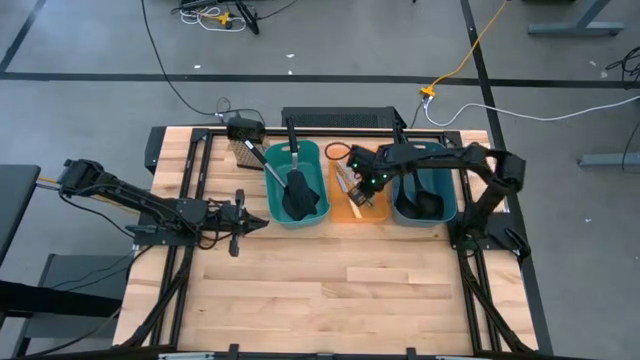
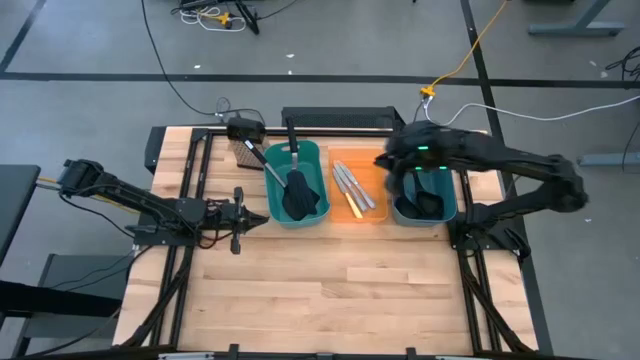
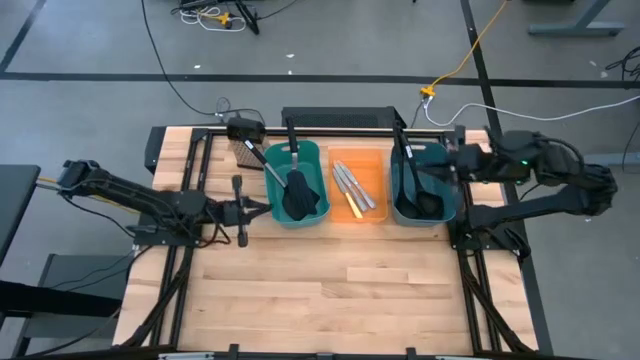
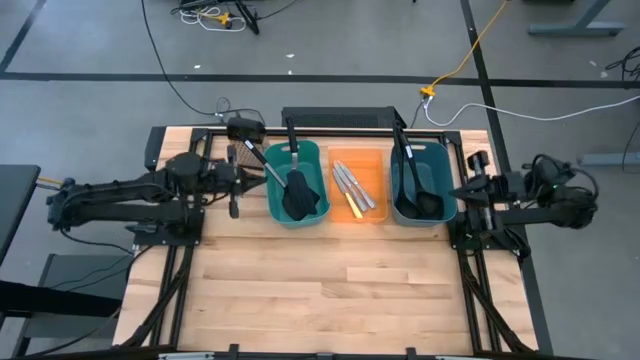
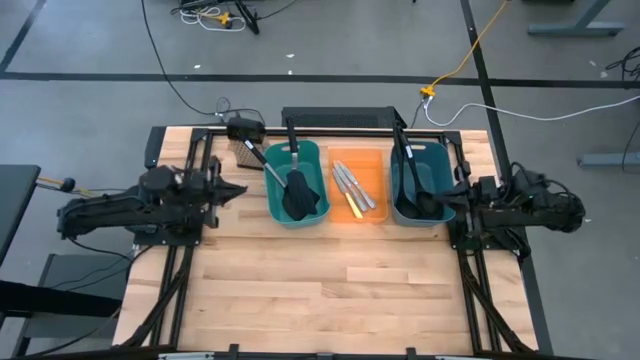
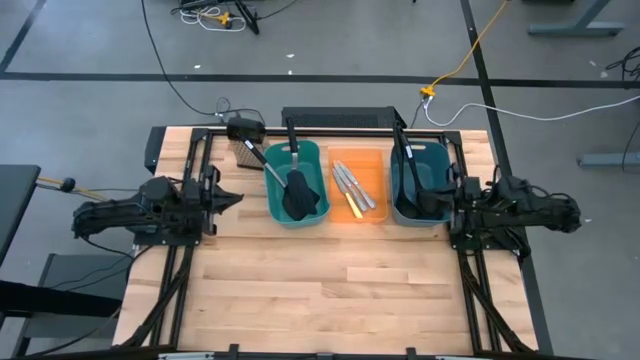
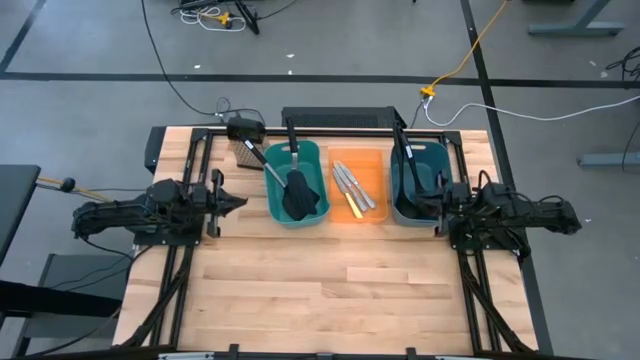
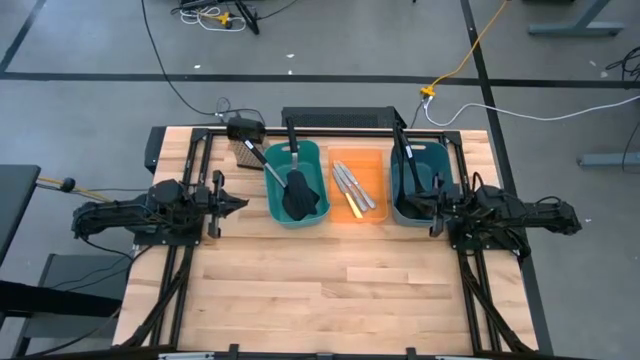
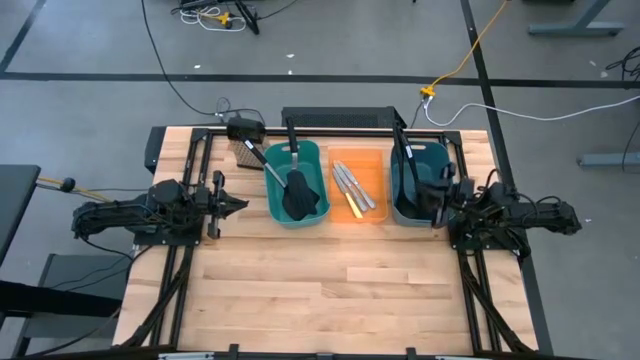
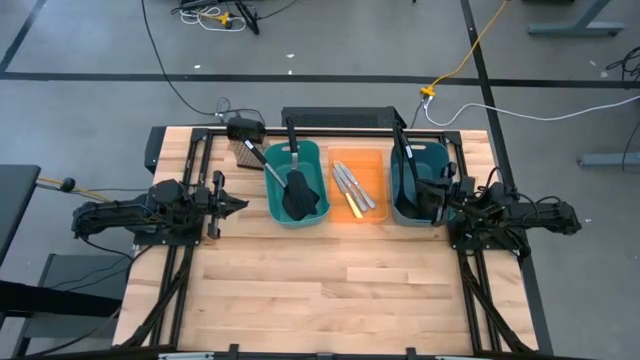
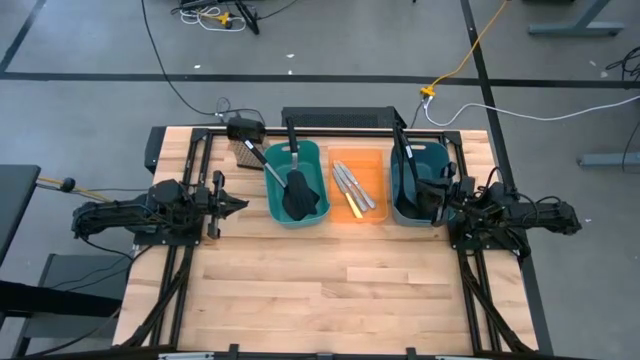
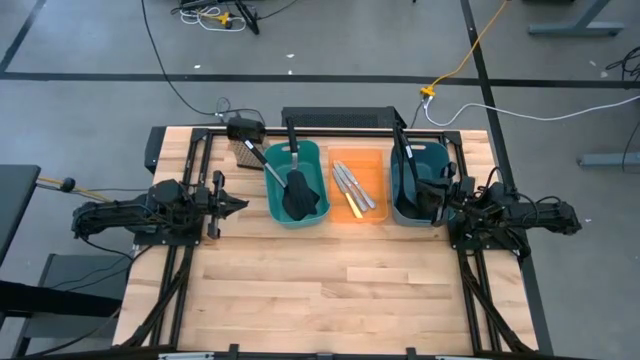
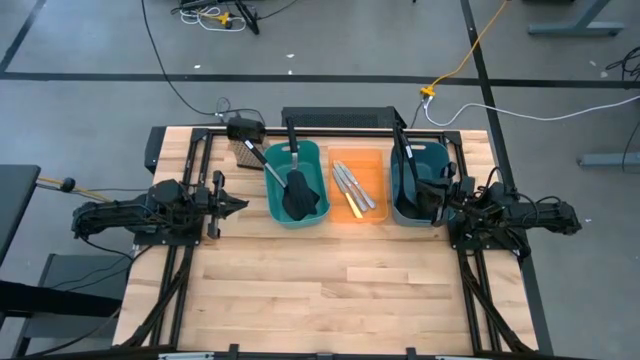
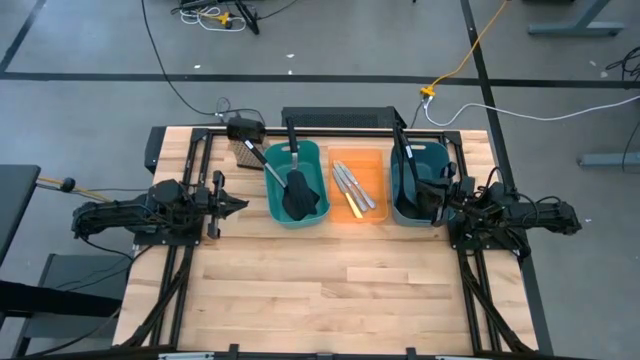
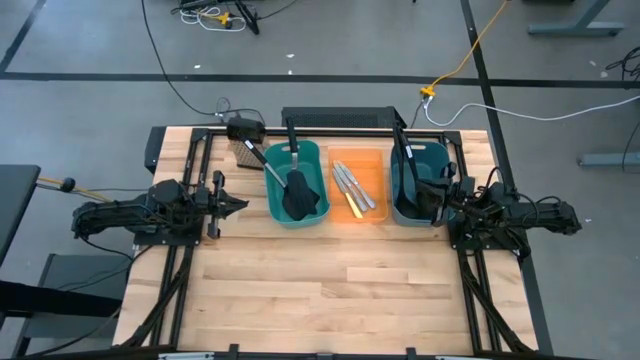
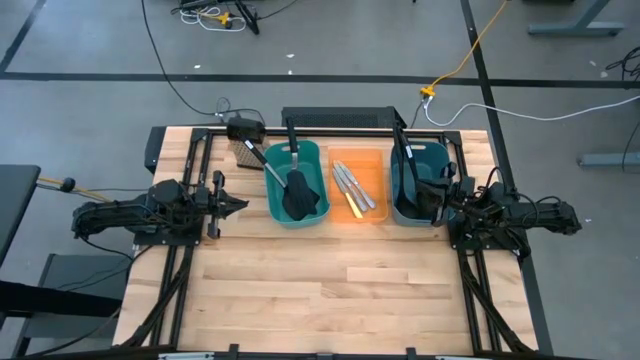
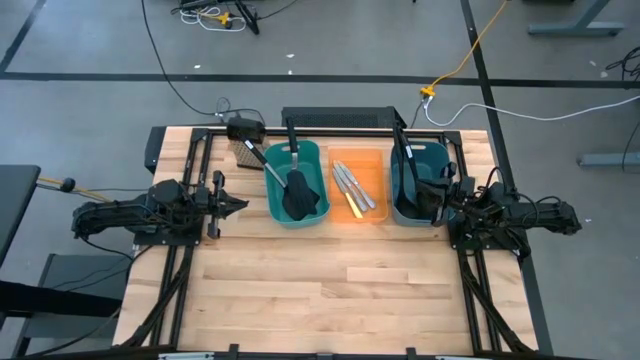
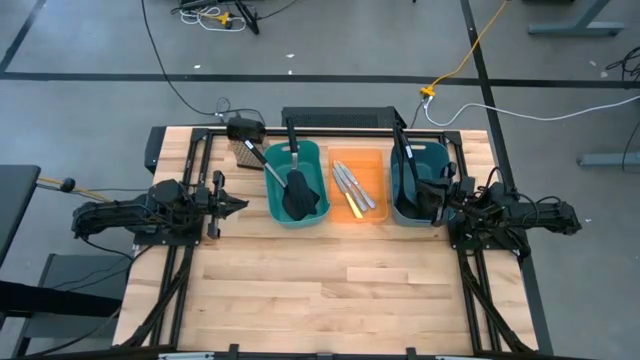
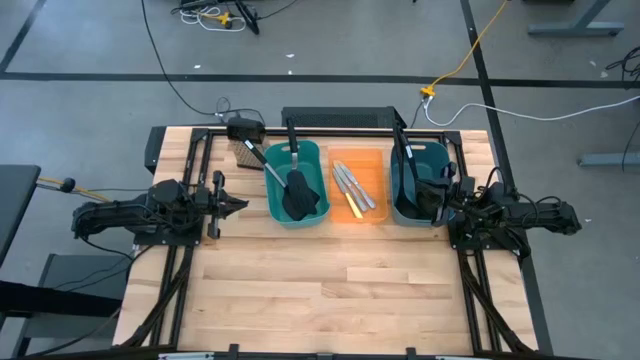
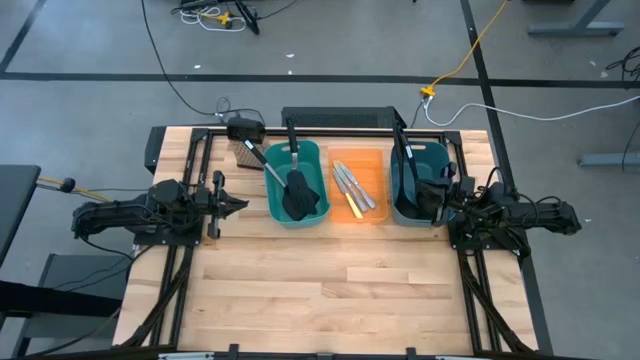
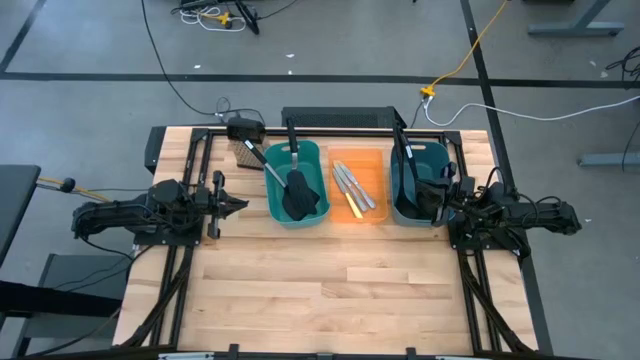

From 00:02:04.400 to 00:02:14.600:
Task: Pick & Place Kitchen Items
Return to Home Position

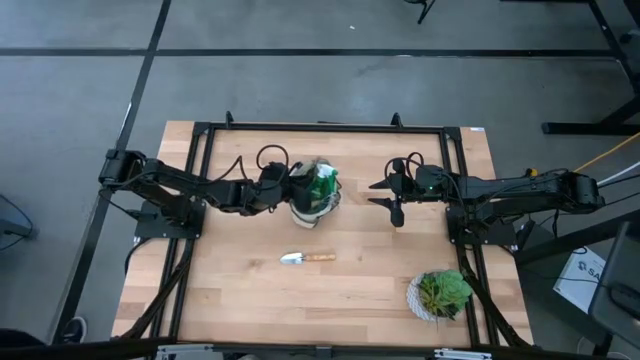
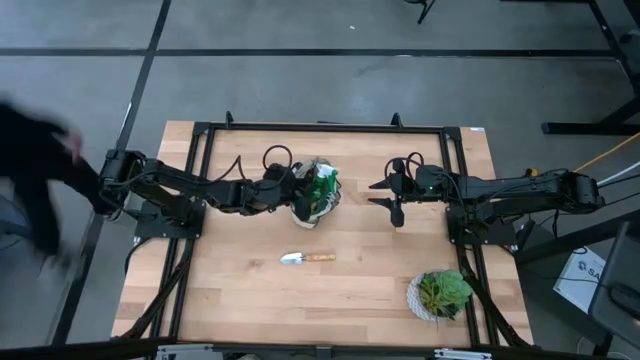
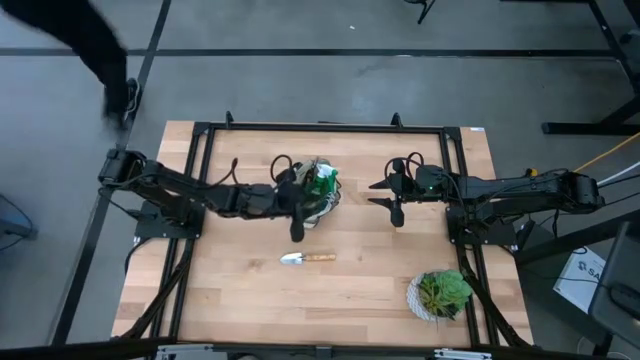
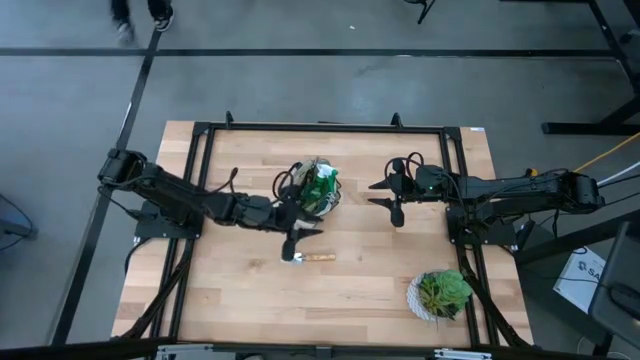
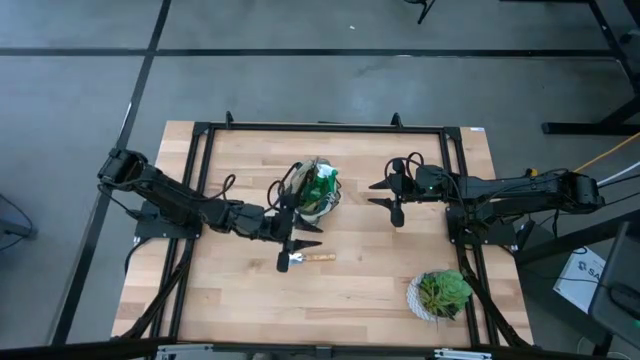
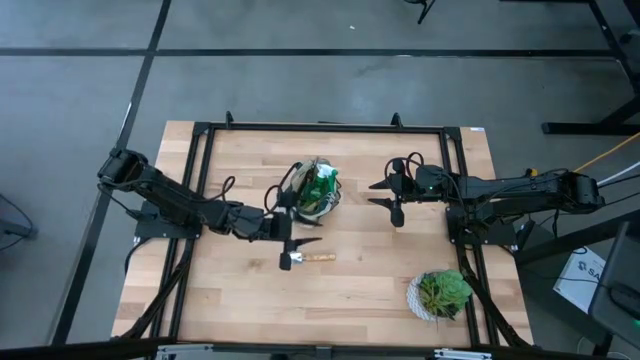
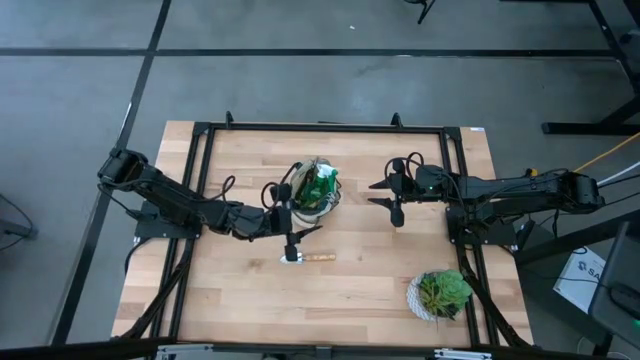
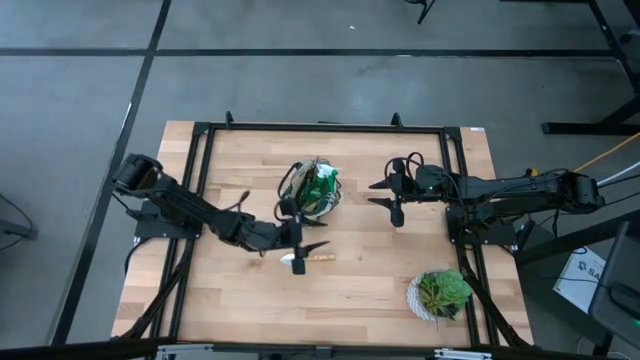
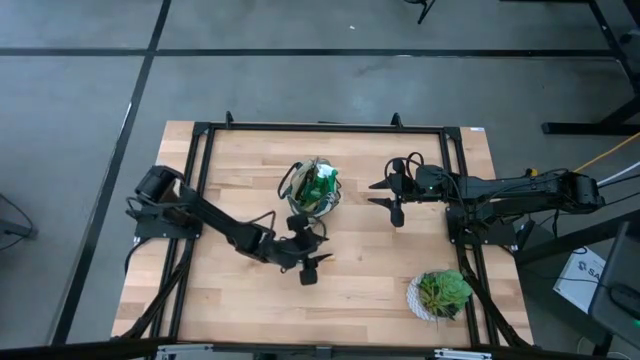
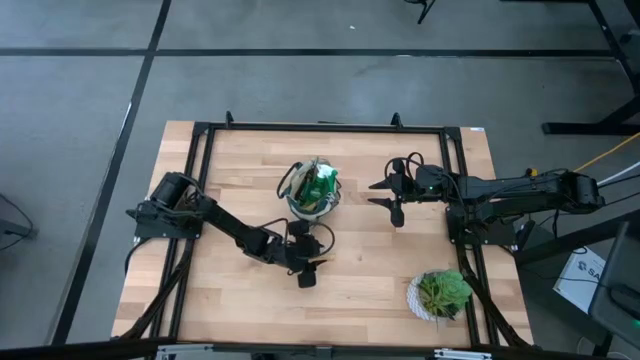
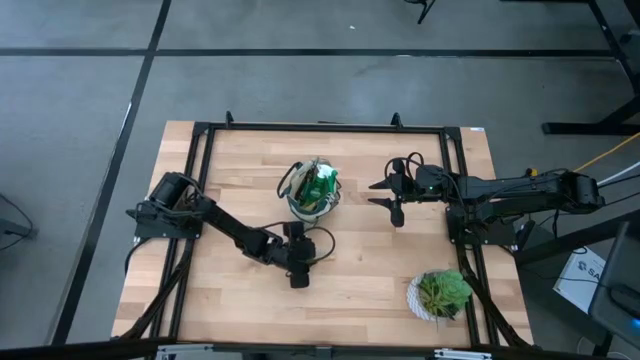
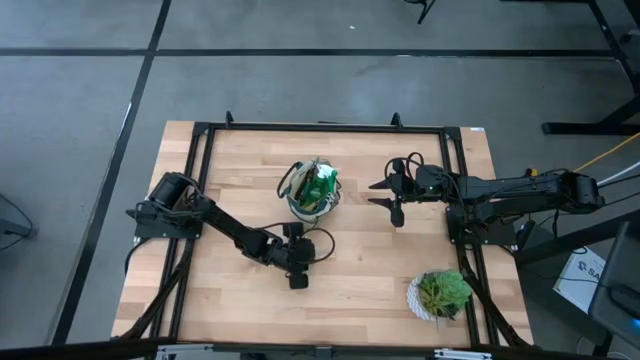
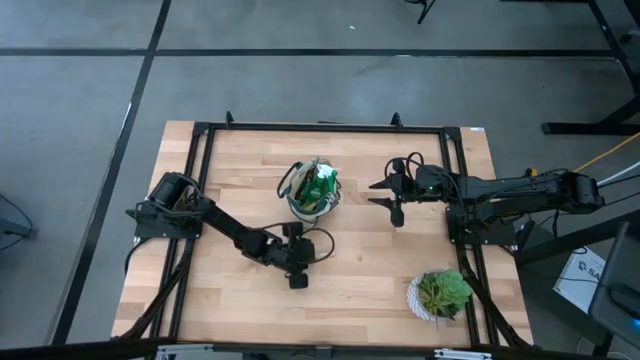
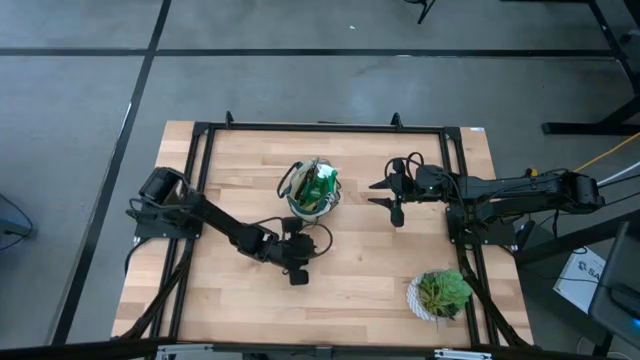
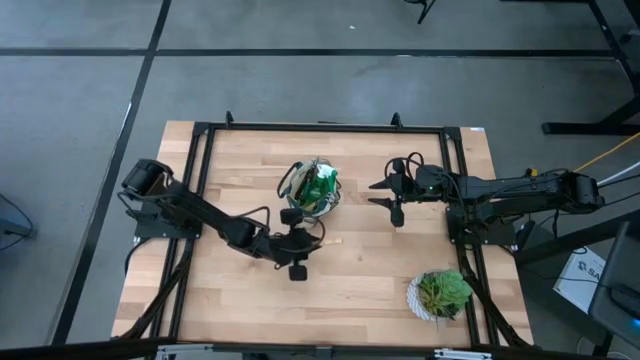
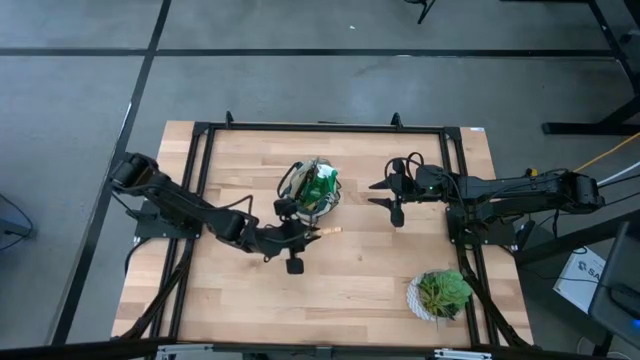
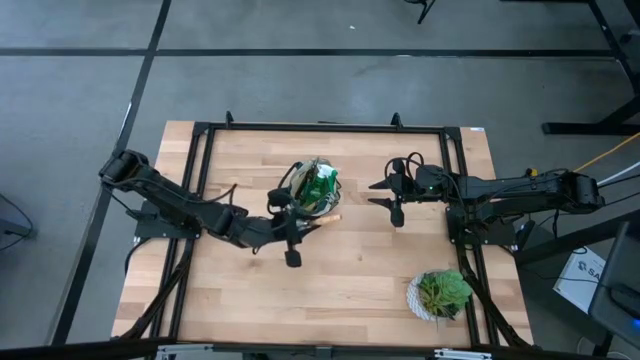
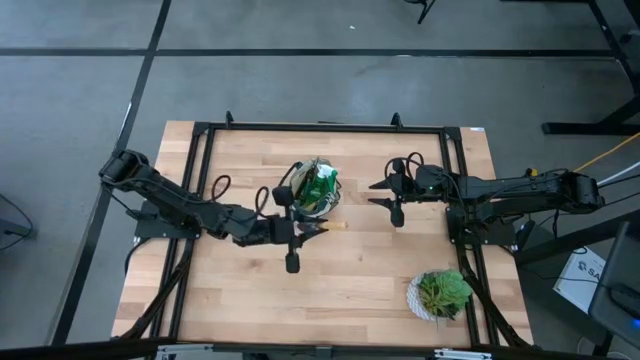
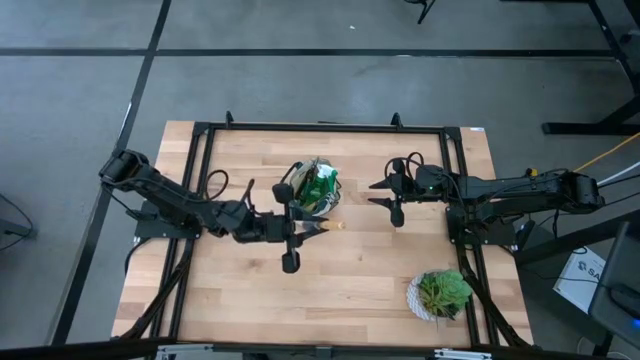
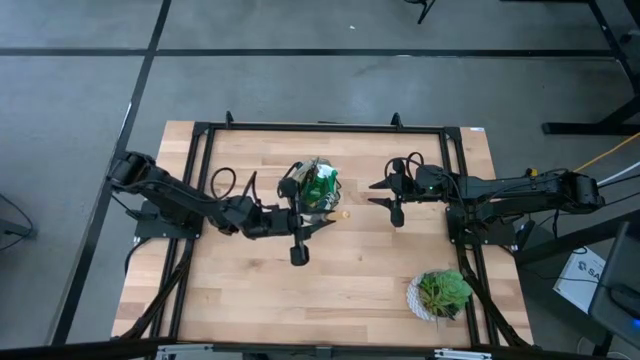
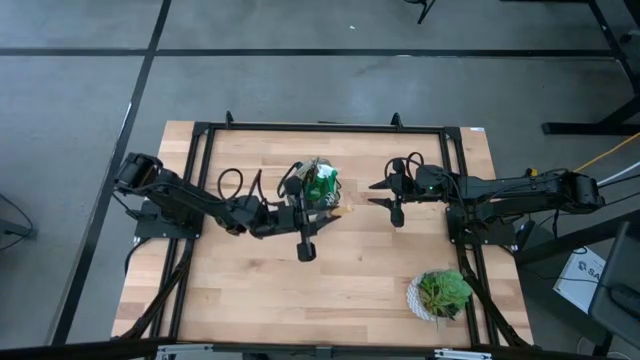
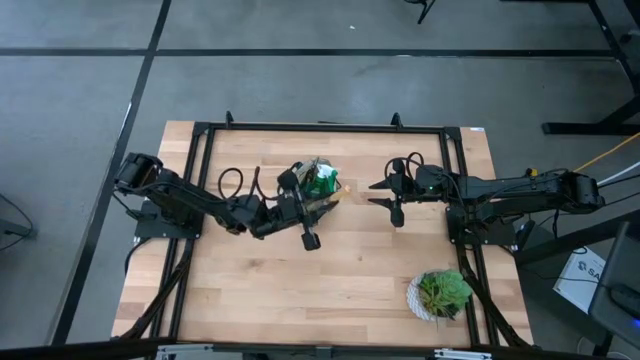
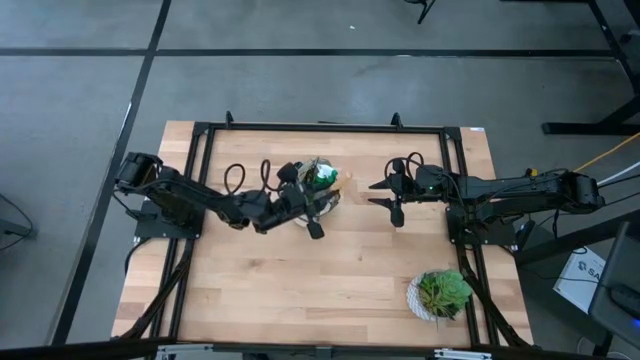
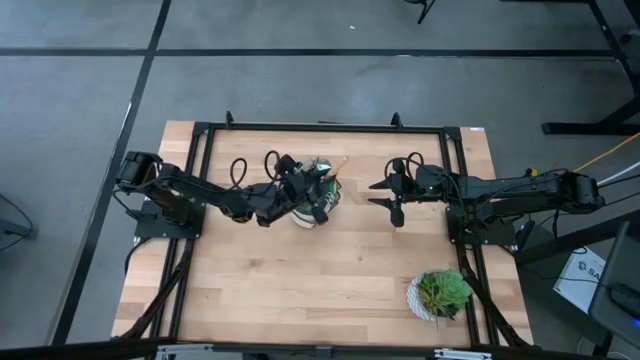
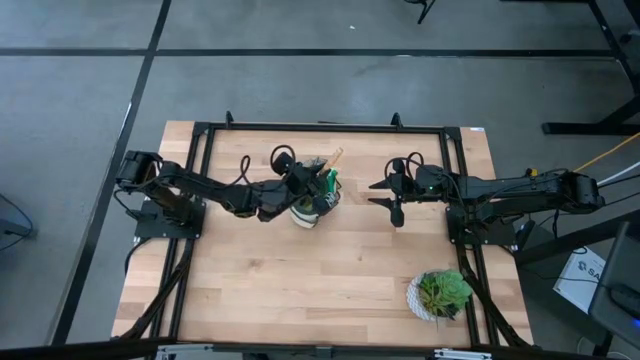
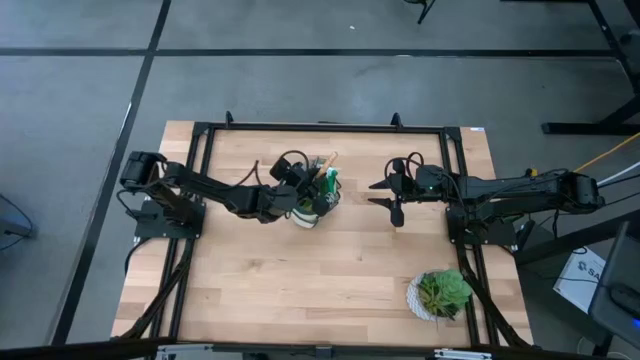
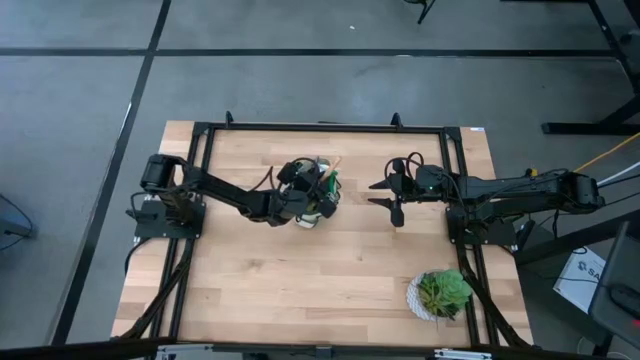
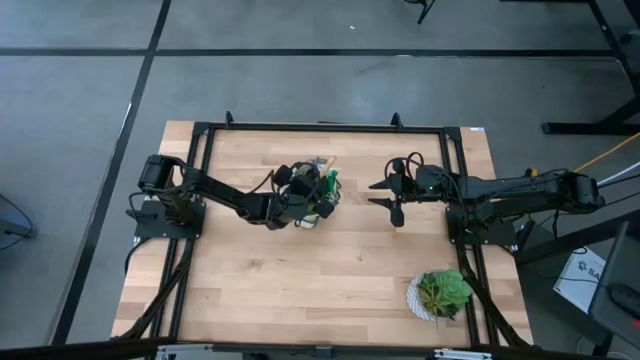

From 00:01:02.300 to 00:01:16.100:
Task: Pick & Place Garden tools in Gardening bag
Put the brown trowel into the gardening bag
